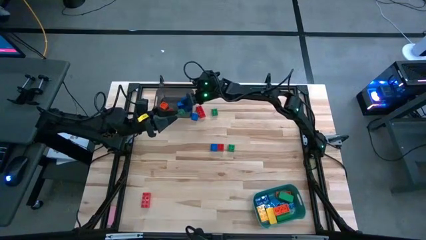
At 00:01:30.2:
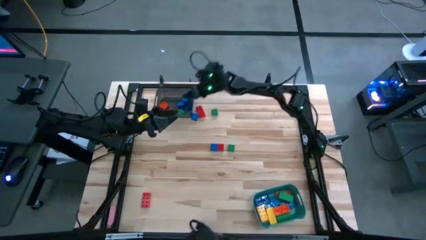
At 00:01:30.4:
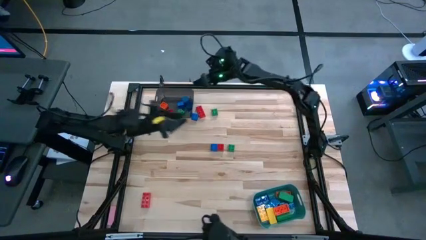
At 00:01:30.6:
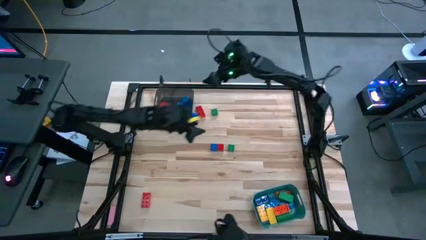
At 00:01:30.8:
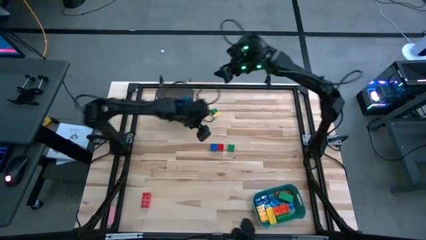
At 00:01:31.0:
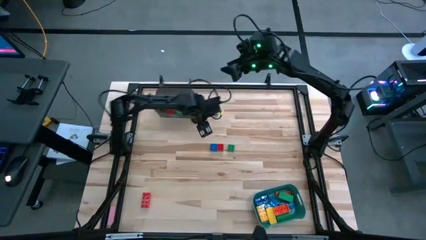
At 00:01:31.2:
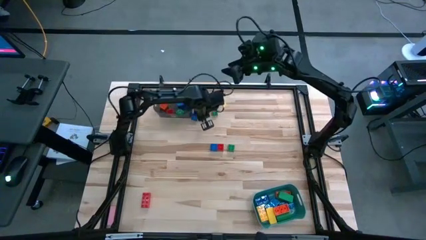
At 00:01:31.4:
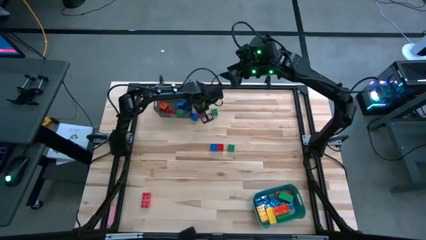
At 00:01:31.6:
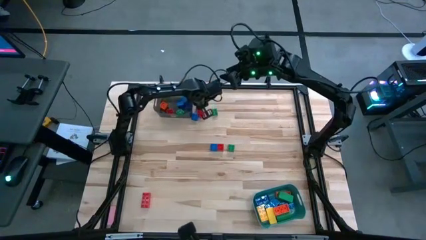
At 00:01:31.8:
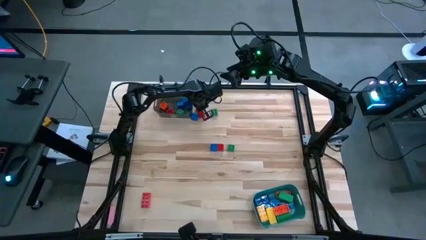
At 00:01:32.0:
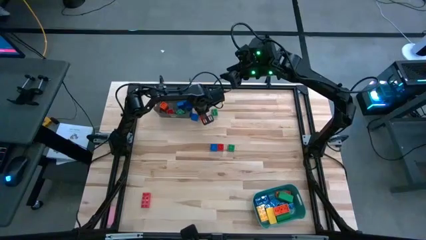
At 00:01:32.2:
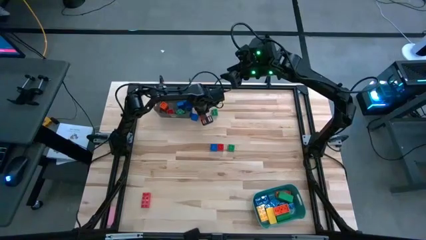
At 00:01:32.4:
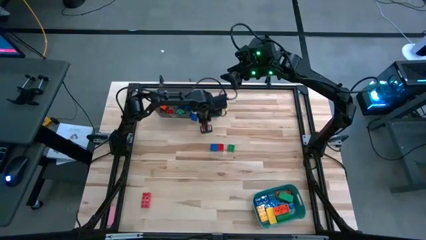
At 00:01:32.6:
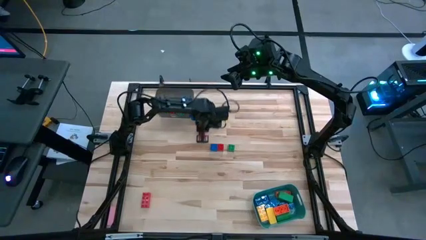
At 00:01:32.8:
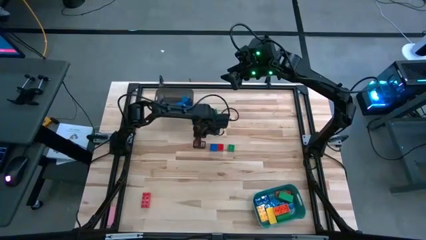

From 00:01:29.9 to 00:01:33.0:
Task: Sort blocks by size
Adjust the top red game piece into the middle

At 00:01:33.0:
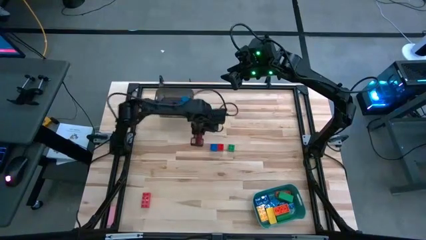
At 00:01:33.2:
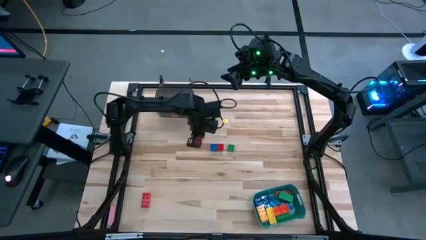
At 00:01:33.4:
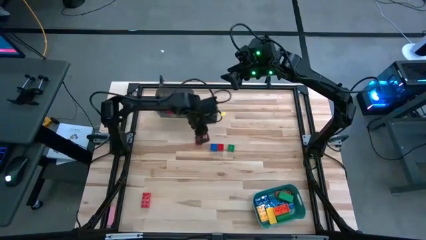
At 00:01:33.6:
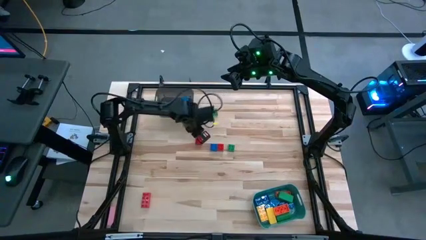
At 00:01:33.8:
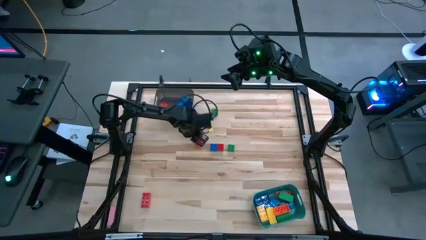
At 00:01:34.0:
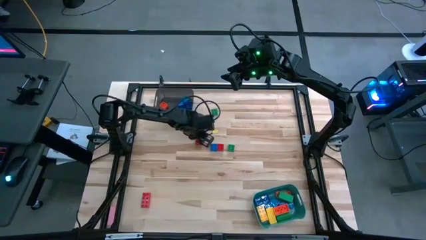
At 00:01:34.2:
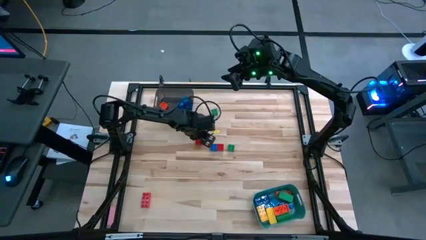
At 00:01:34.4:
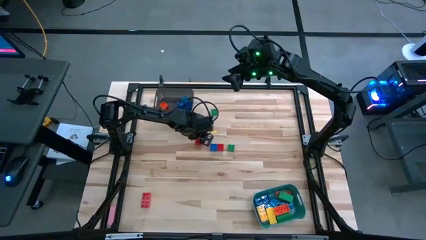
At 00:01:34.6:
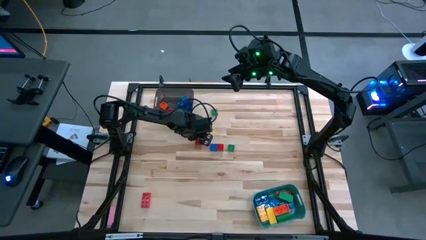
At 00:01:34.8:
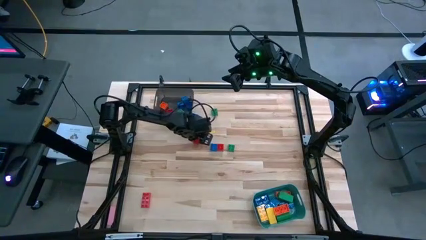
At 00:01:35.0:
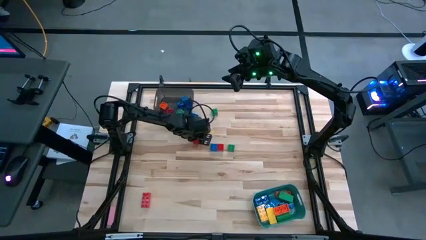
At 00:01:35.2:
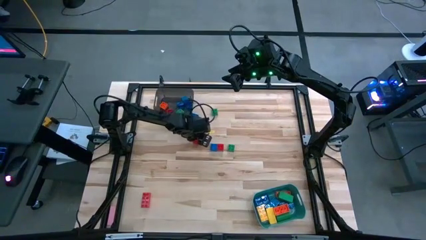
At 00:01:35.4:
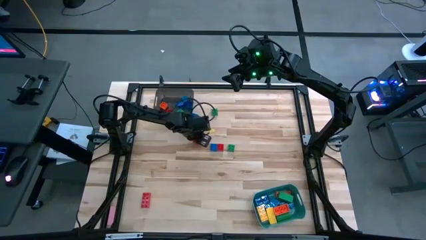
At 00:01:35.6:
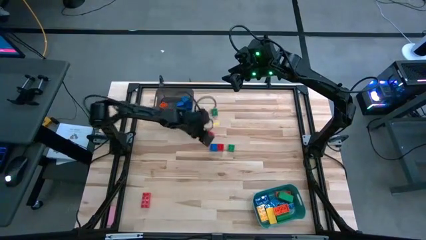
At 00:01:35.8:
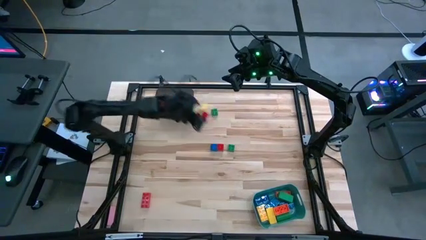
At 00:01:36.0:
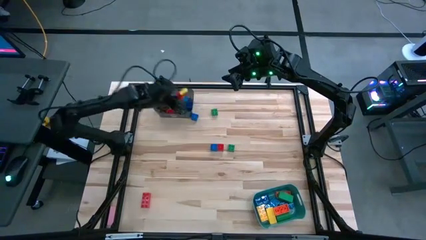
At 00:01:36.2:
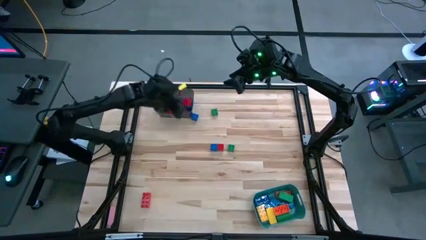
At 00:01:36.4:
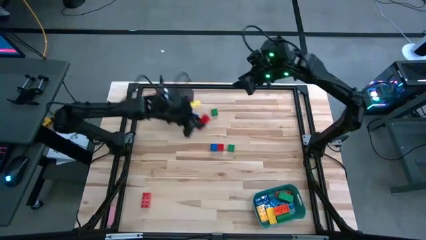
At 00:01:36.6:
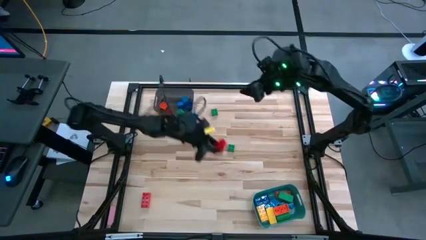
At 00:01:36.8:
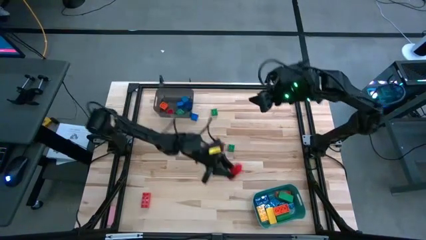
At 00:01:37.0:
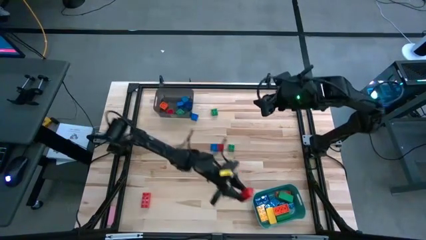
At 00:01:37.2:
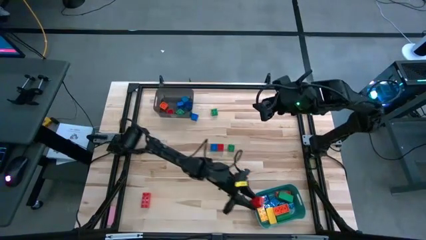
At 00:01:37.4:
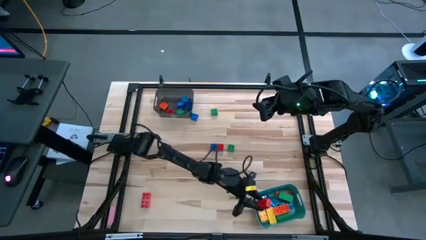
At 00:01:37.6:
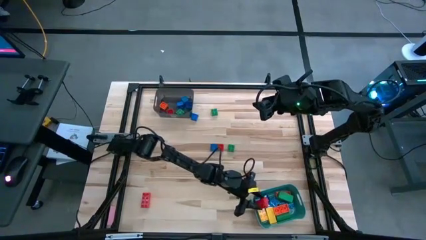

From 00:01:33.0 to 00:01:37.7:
Put the red game piece into the blue bin

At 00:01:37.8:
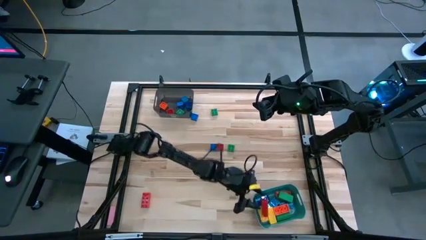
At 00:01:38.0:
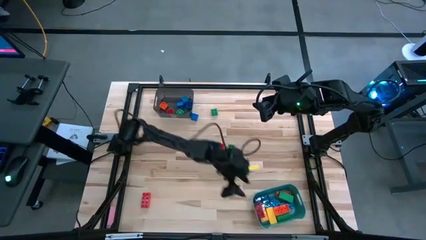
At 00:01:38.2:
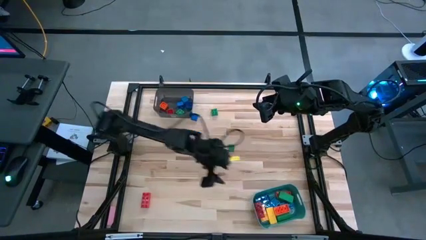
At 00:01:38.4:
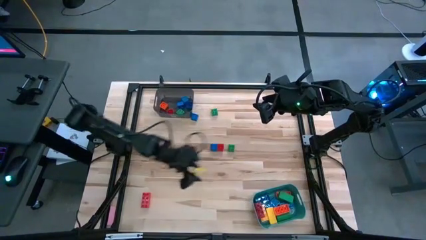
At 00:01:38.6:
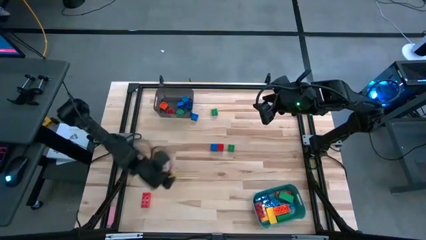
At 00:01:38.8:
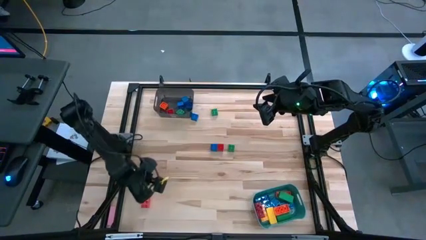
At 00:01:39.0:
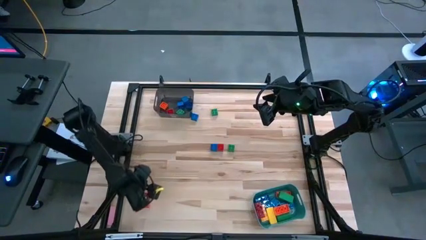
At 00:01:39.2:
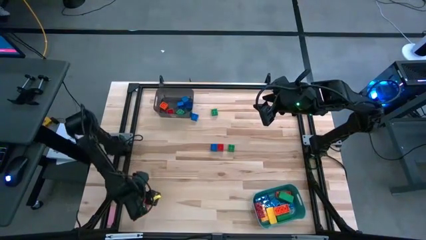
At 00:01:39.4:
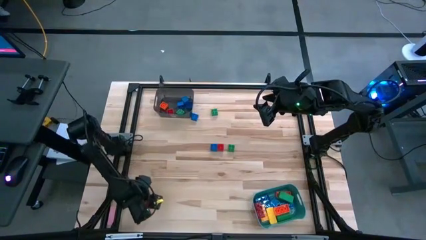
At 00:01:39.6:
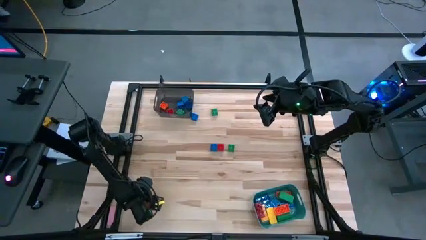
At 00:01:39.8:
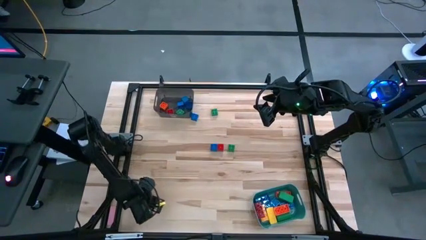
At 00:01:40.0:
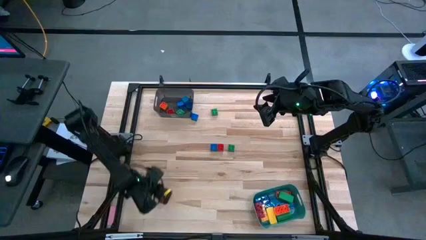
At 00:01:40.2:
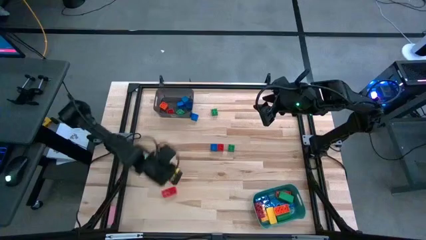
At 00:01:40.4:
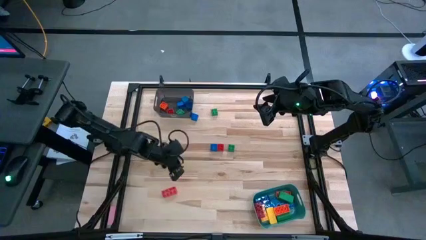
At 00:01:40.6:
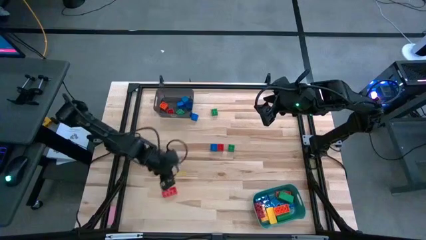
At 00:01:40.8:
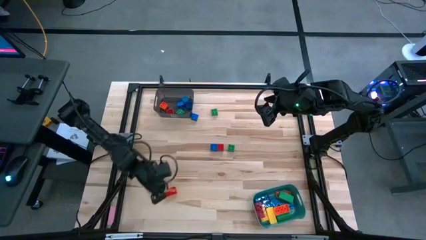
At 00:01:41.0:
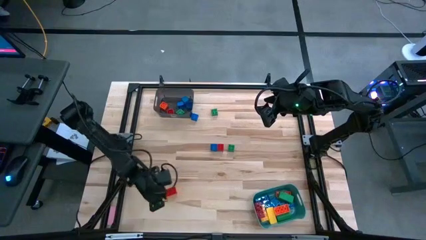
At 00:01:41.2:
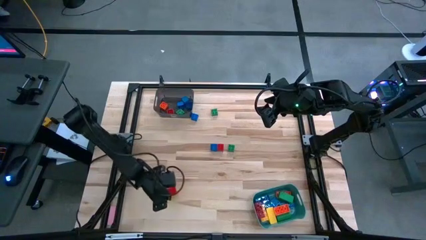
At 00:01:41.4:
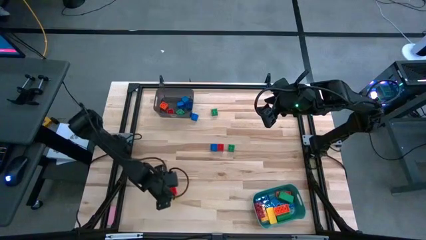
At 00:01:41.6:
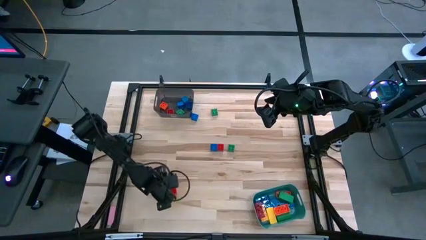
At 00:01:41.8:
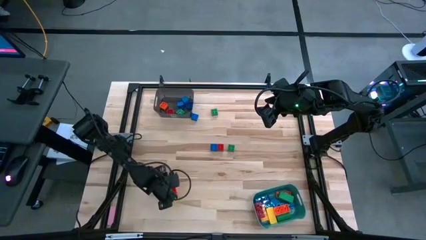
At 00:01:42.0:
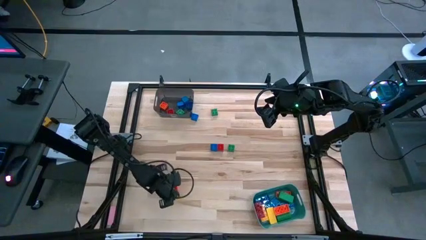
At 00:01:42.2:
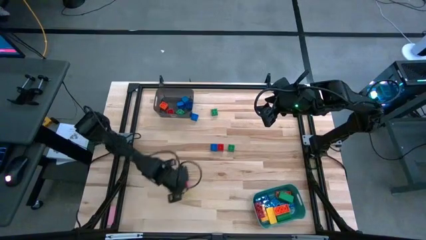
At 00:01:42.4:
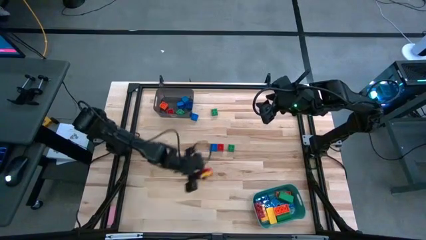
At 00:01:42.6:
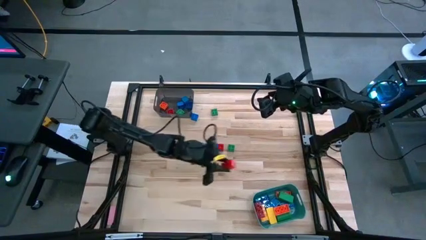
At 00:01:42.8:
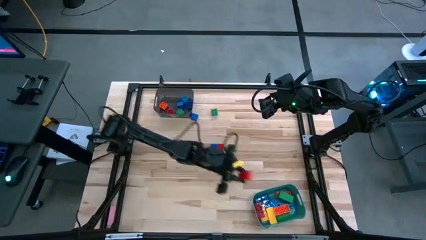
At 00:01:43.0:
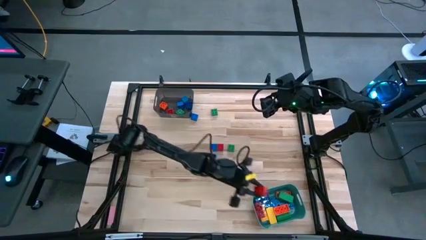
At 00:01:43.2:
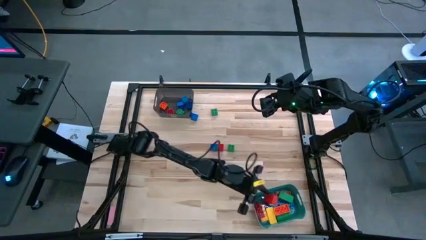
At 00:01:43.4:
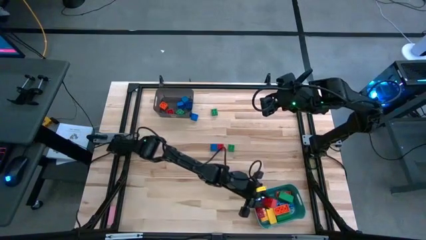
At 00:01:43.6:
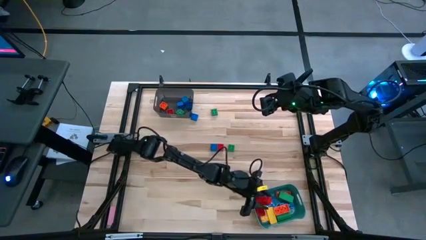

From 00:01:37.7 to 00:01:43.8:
Put the red game piece into the blue bin

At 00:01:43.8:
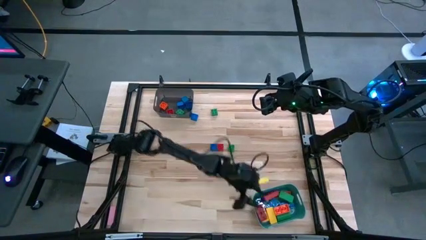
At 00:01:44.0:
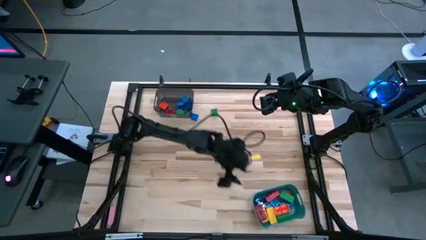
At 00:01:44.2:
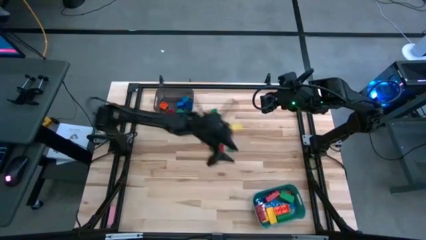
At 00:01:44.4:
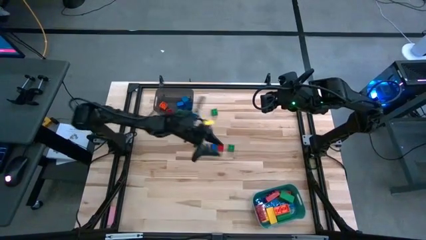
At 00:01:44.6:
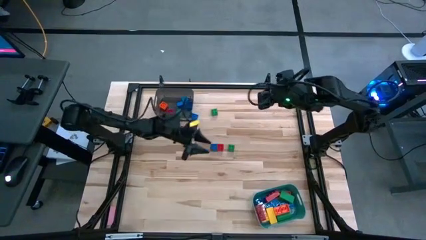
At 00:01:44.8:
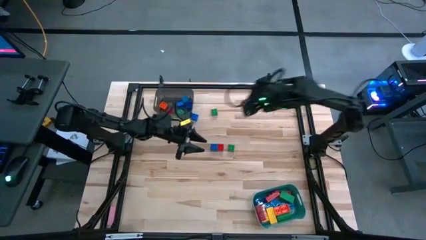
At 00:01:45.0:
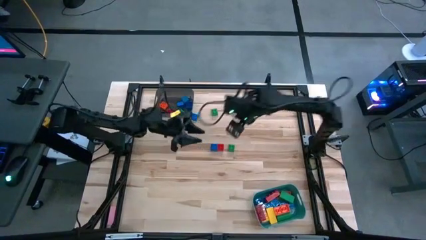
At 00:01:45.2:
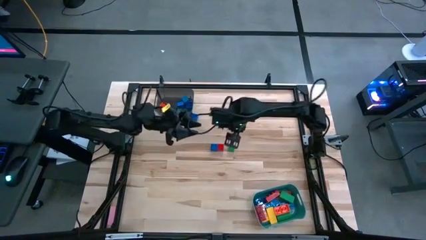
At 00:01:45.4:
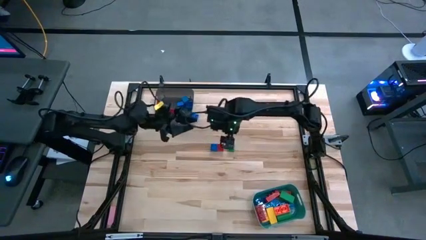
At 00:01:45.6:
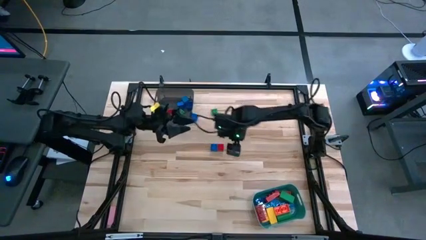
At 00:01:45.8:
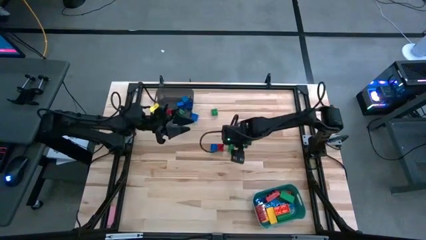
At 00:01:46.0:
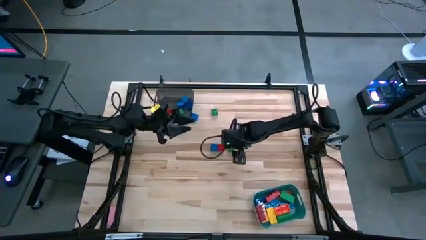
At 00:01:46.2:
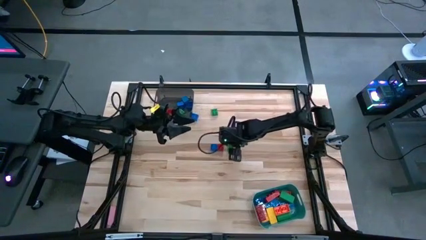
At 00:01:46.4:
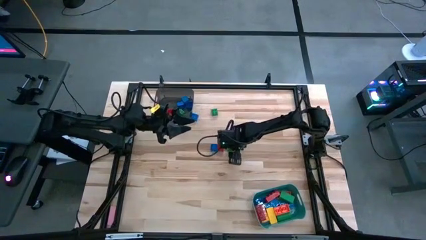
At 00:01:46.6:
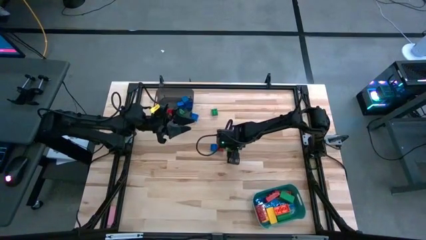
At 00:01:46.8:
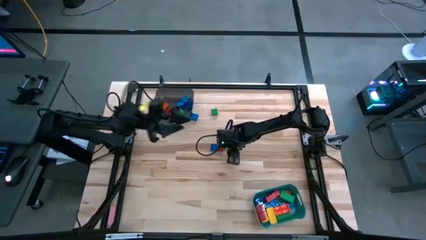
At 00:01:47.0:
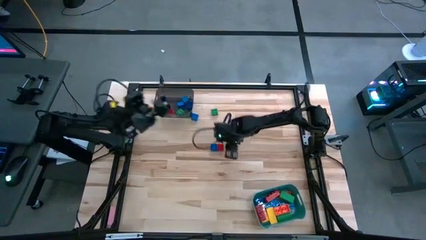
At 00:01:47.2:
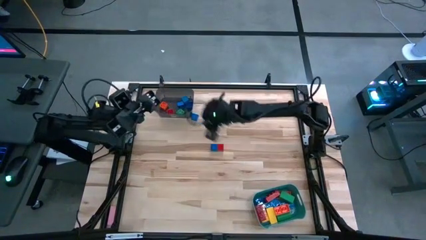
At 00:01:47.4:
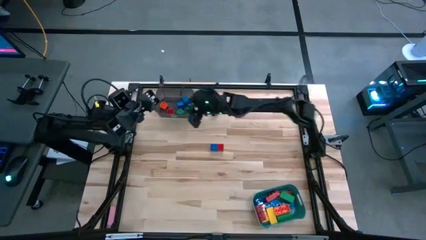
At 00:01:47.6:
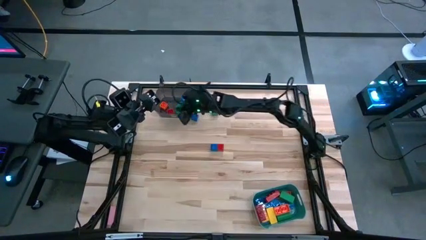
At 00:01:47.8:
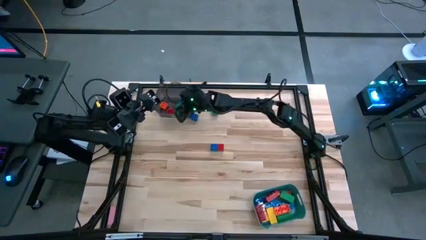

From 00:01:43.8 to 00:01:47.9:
Put the right green game piece into the black bin
